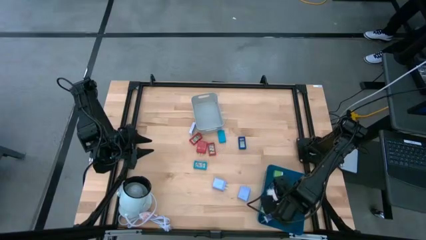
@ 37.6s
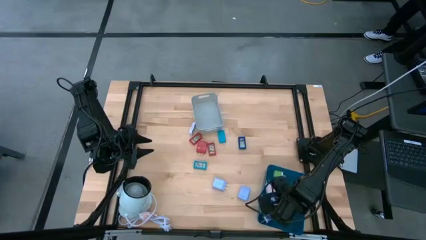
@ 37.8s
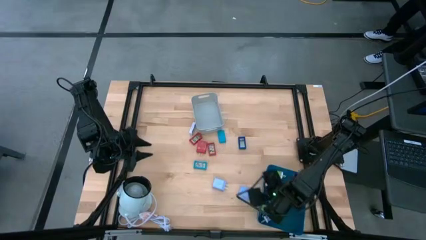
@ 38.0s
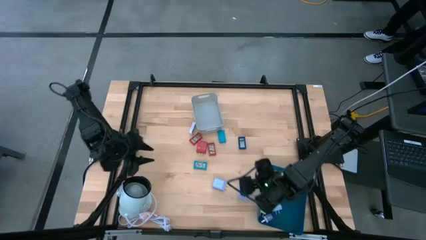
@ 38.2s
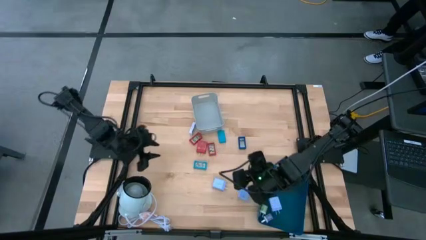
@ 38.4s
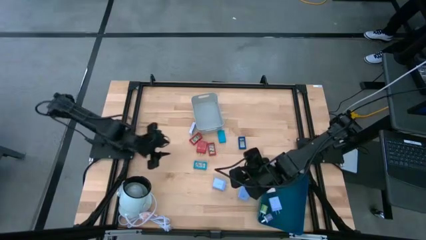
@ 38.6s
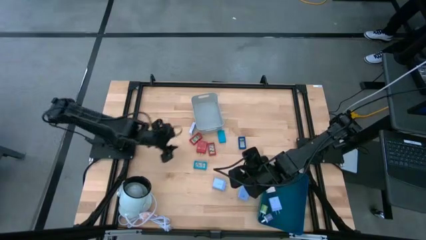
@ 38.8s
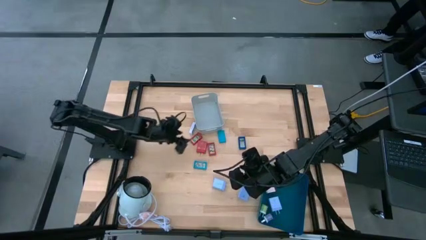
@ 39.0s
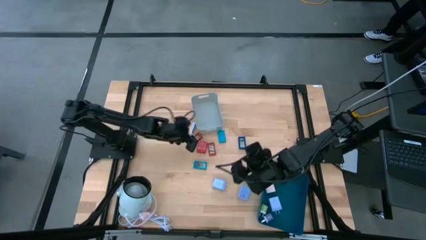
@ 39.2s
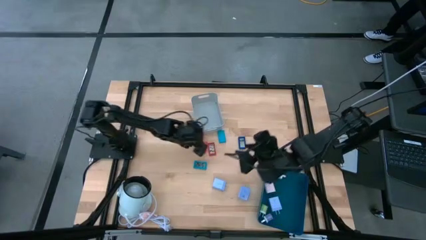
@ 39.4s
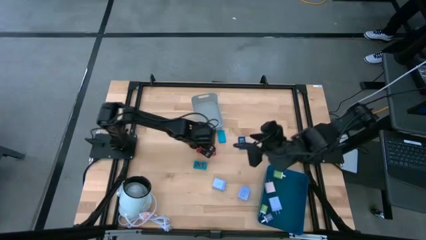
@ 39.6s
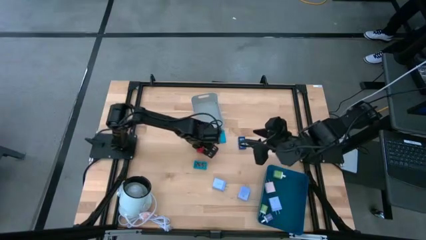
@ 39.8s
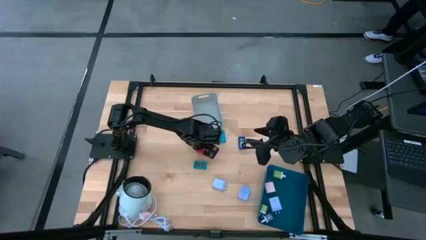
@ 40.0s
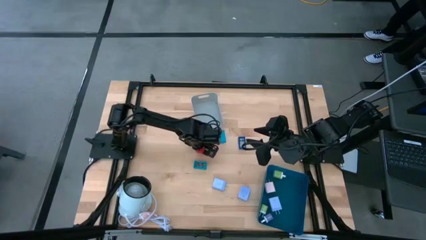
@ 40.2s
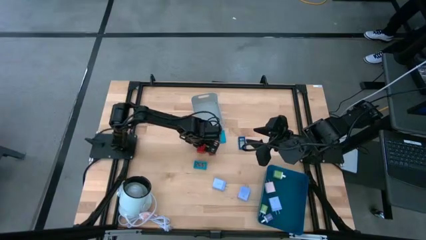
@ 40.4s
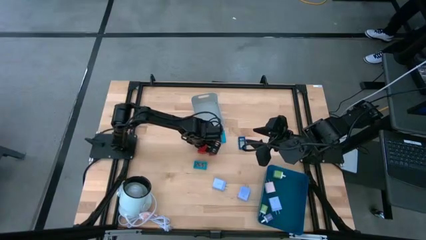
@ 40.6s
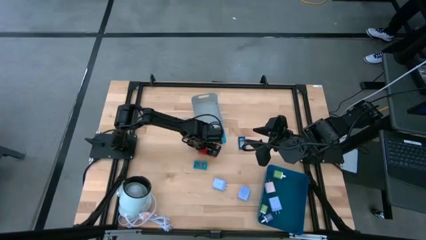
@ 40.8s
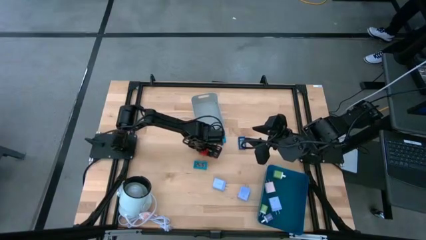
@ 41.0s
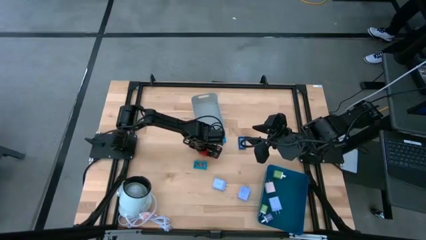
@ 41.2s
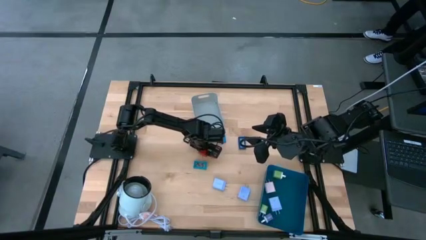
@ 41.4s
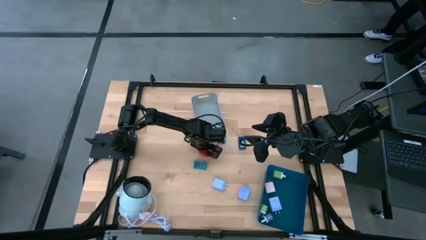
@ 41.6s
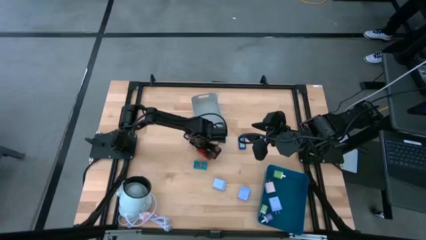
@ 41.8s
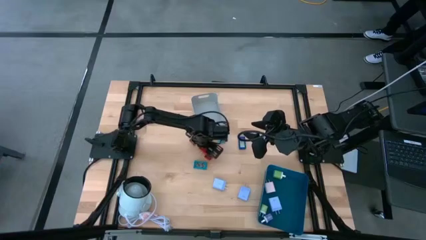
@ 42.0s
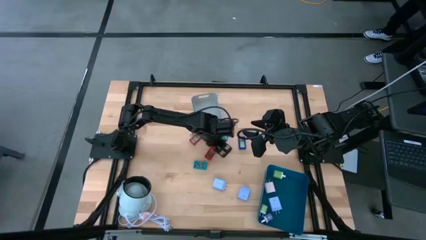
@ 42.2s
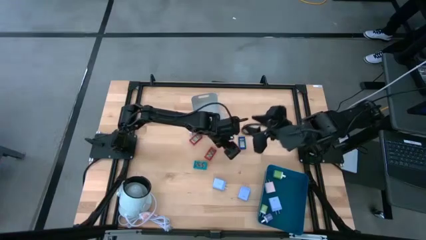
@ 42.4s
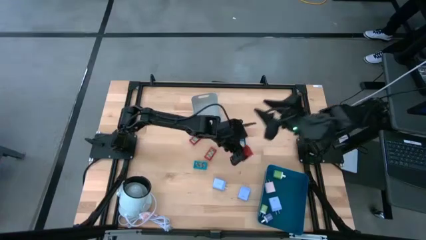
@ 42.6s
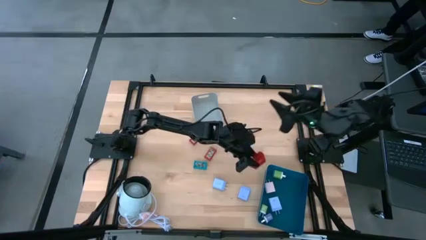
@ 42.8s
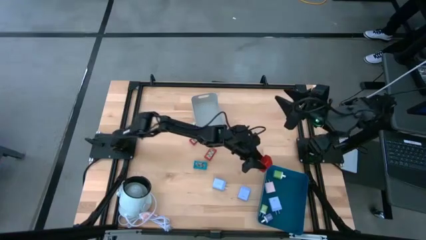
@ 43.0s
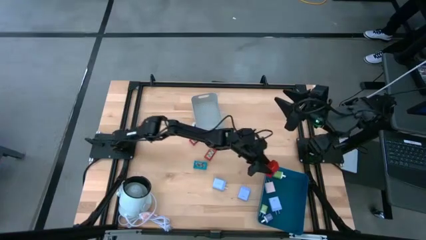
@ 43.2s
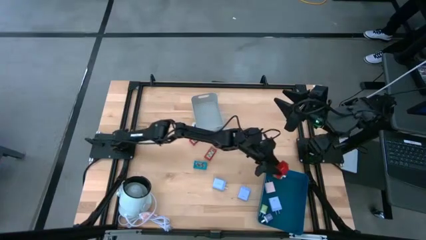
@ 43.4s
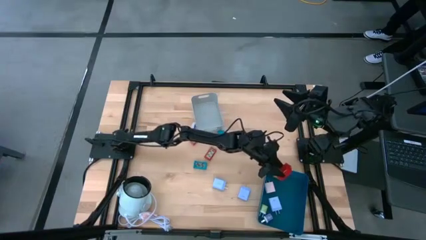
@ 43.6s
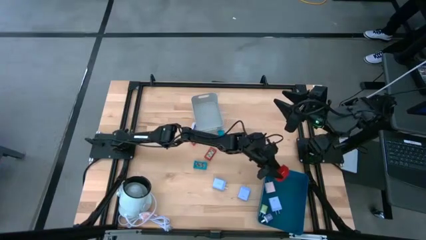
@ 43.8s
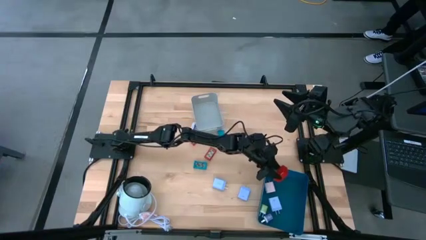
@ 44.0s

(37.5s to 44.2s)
Task: Pick & Place Office items
Put the red charger adapter into the blue bin

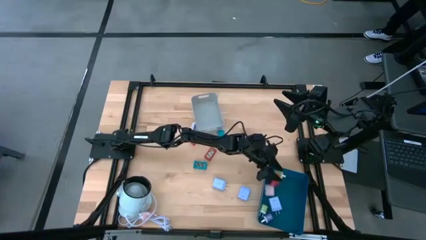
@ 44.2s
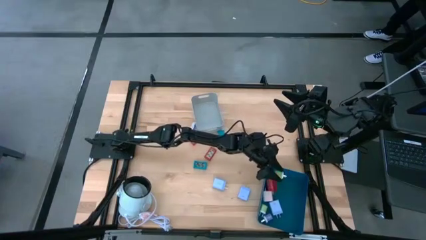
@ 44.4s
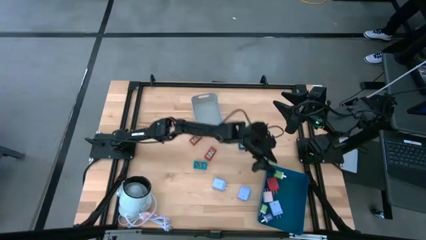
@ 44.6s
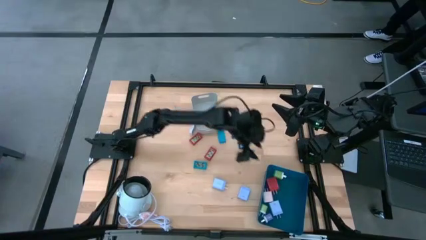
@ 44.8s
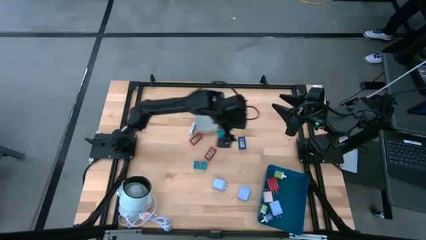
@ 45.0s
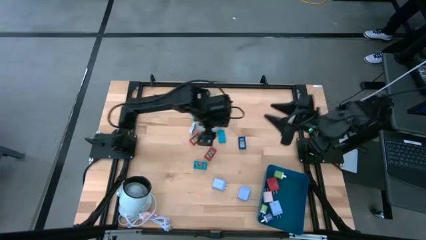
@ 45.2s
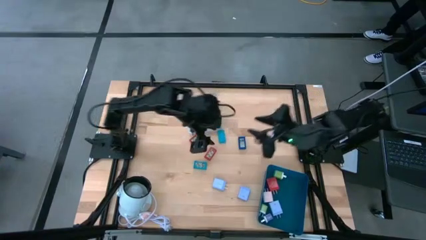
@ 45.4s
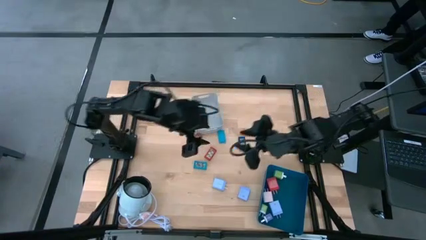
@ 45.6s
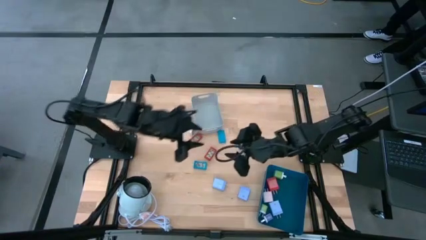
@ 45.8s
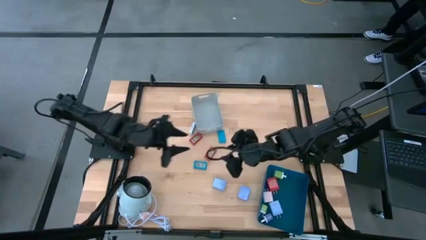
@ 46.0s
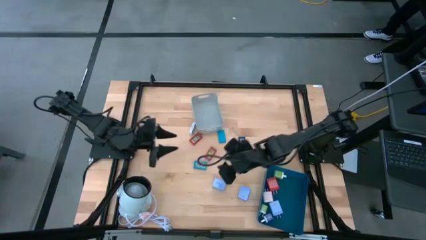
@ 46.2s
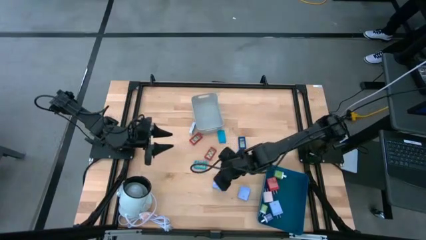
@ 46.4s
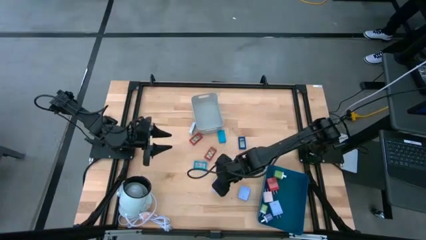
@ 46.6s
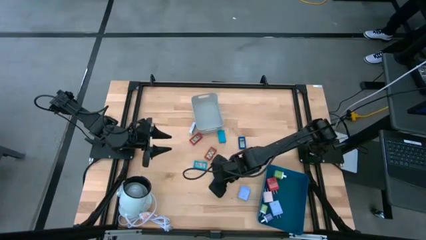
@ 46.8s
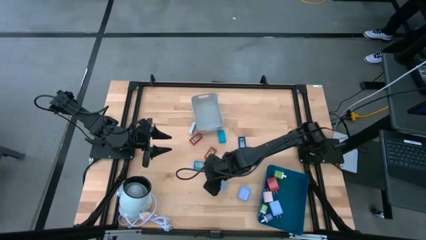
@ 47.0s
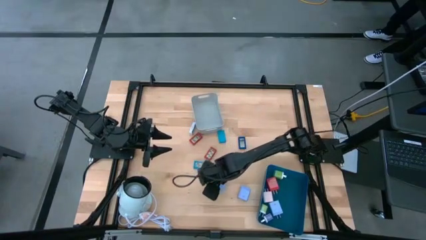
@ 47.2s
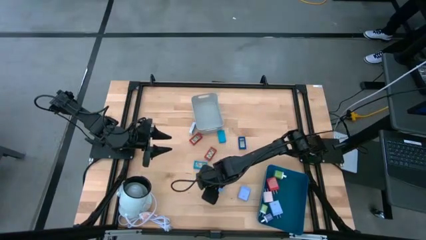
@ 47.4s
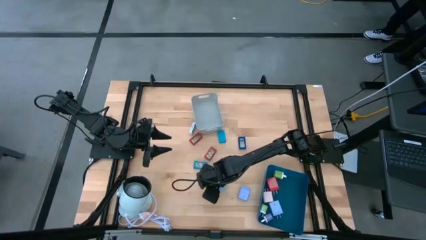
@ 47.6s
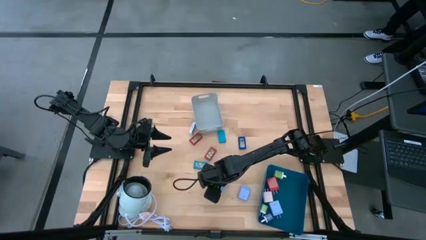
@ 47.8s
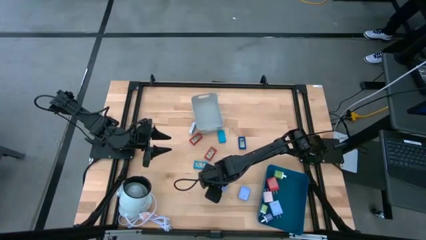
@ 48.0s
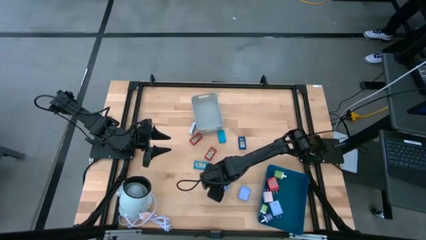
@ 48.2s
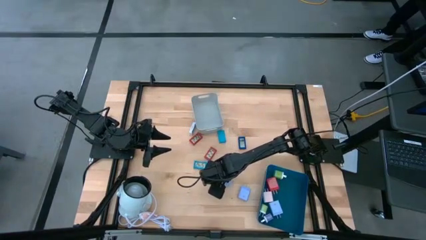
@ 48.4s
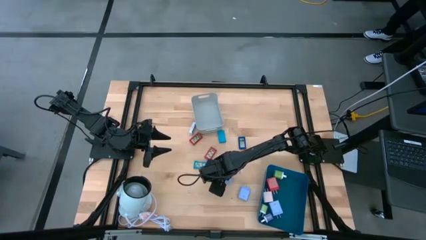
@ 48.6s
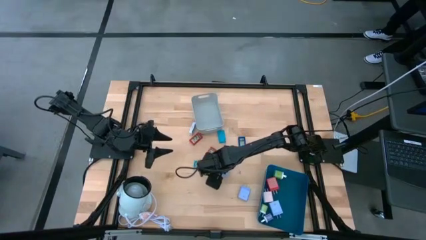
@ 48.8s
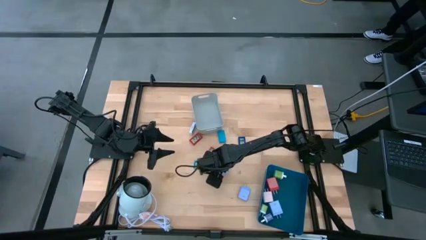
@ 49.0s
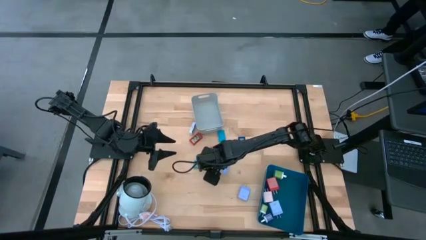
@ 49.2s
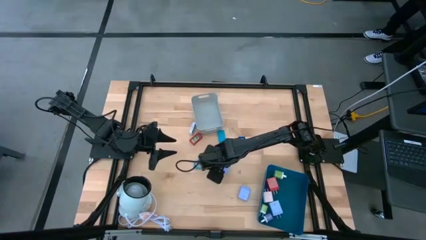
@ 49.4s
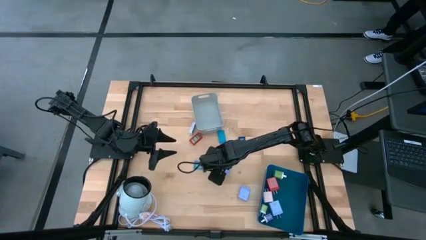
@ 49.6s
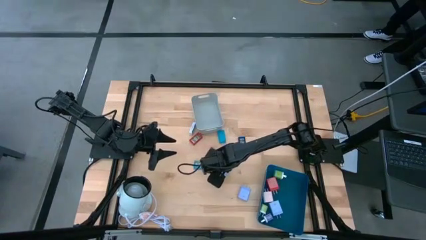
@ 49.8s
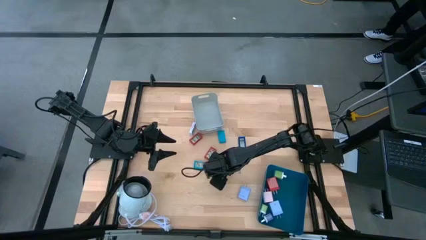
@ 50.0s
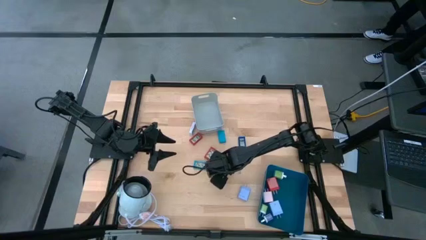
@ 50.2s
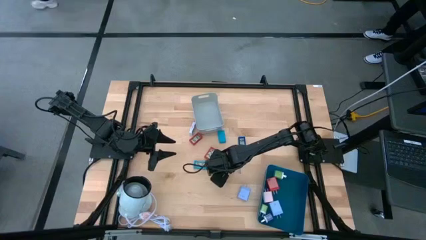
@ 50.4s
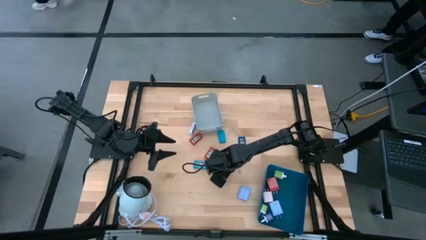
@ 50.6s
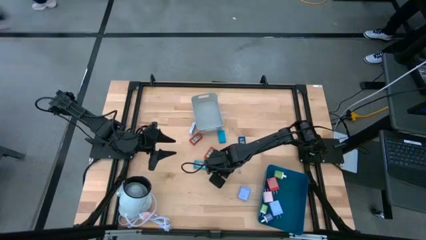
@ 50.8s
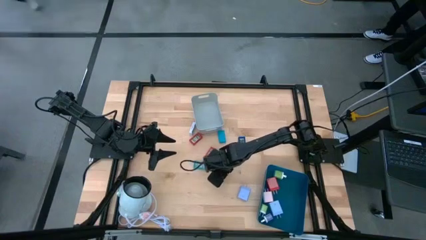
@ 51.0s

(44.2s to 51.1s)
Put the left blue charger adapter into the blue bin

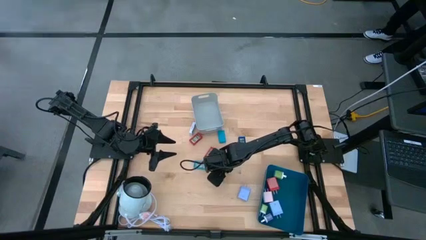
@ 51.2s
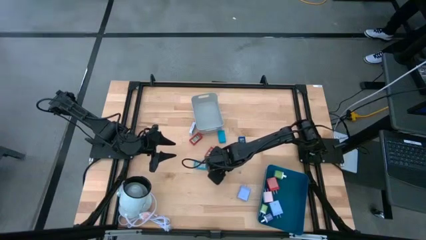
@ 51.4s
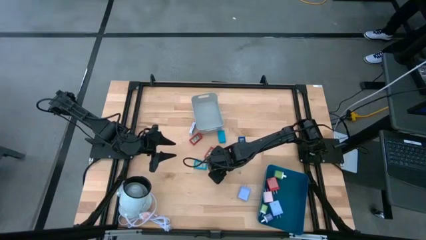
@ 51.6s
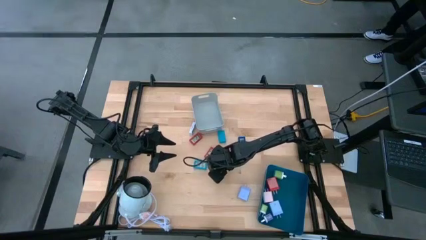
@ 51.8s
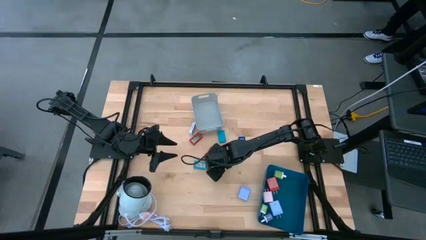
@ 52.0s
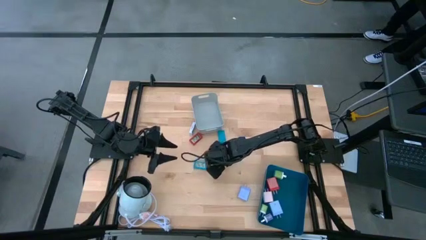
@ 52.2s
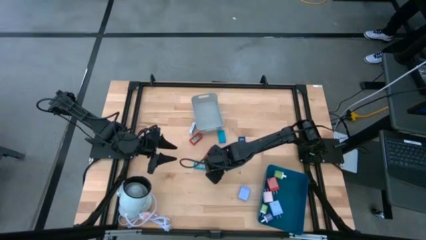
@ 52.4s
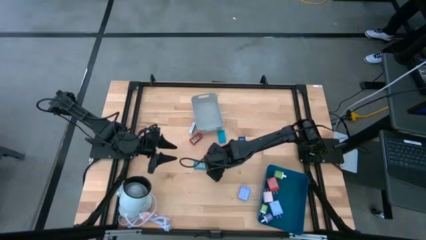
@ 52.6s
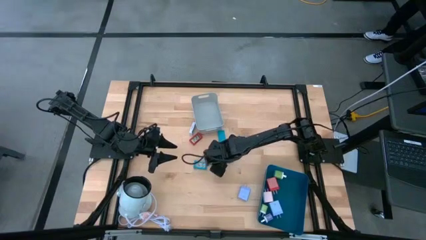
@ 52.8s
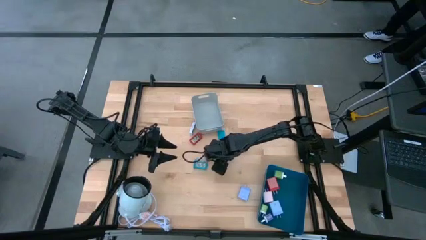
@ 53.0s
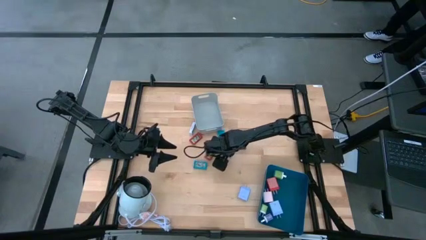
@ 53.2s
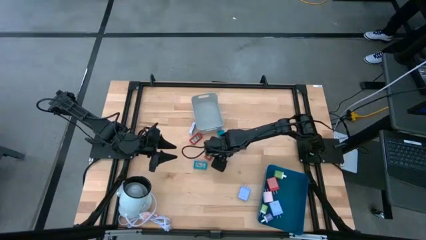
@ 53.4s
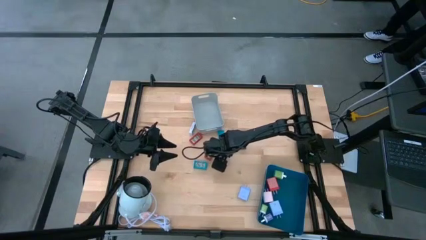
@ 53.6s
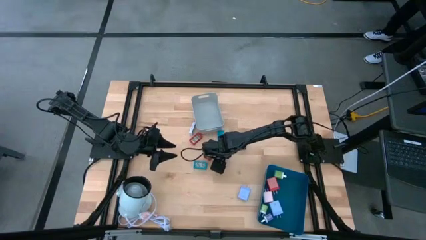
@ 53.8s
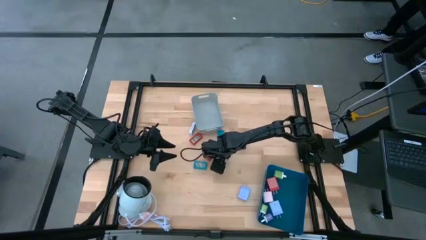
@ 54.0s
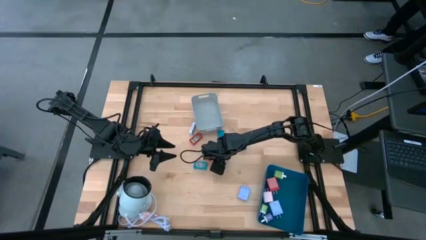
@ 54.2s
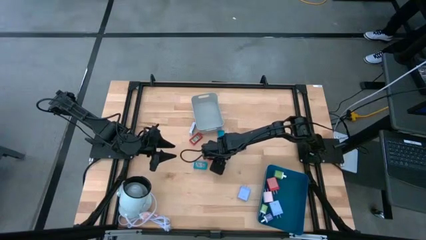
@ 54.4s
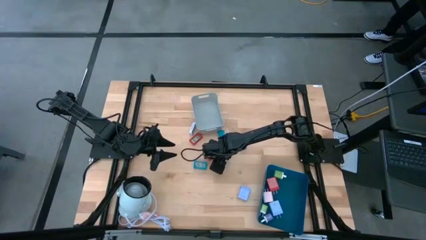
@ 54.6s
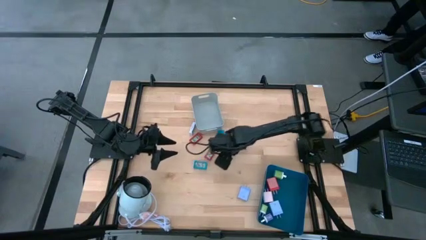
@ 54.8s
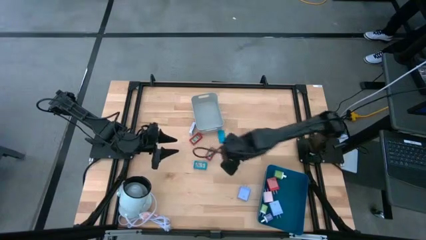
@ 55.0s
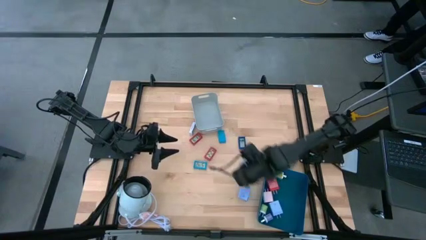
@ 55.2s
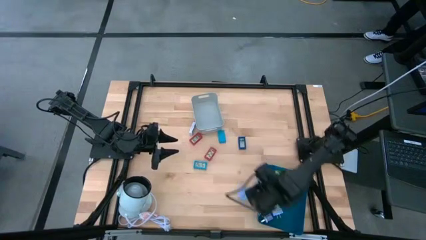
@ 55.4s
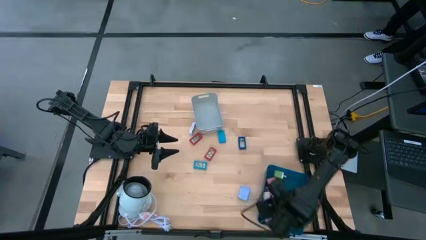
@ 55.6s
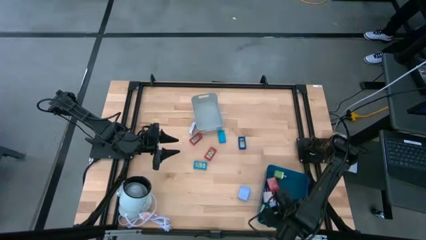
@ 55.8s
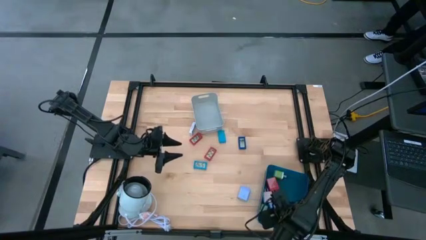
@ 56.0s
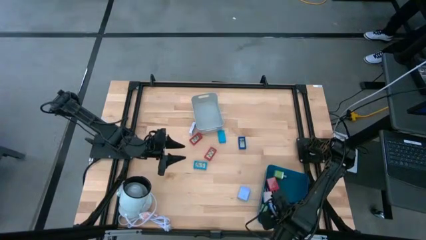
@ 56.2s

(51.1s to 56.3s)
Put the left blue charger adapter into the blue bin
